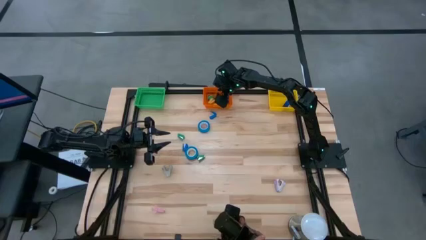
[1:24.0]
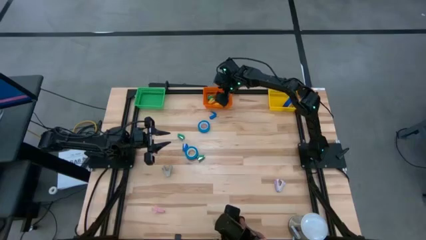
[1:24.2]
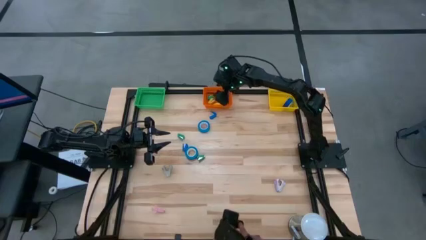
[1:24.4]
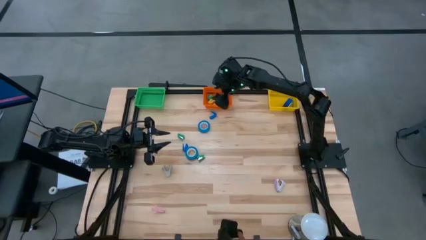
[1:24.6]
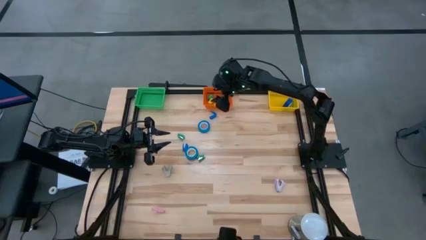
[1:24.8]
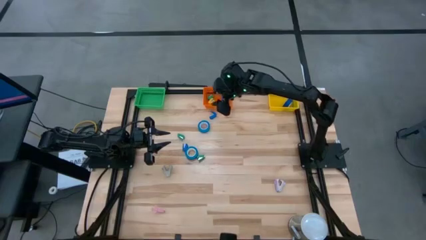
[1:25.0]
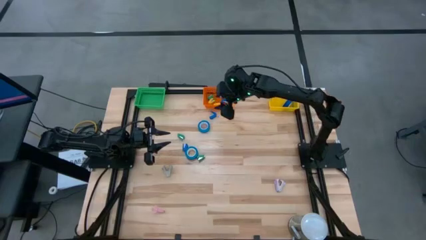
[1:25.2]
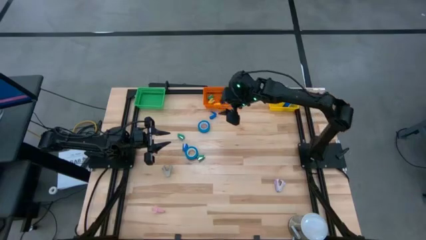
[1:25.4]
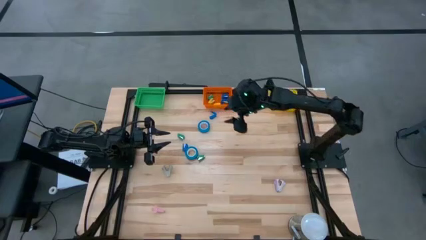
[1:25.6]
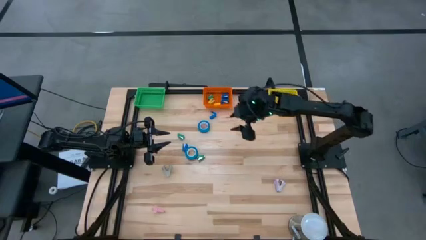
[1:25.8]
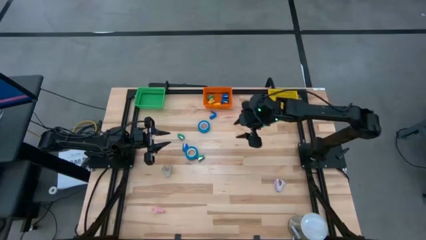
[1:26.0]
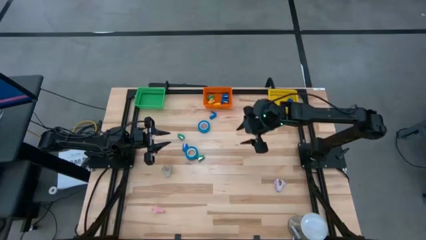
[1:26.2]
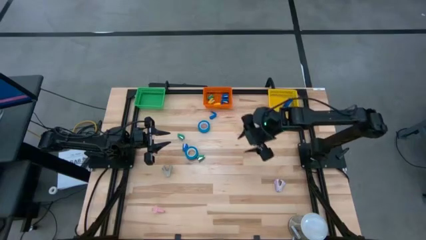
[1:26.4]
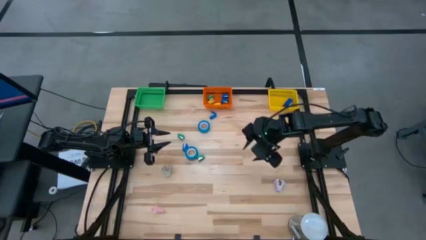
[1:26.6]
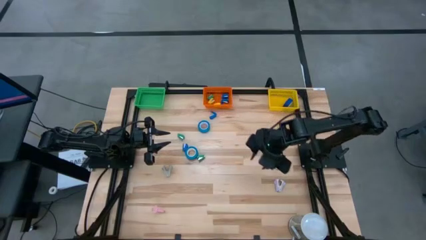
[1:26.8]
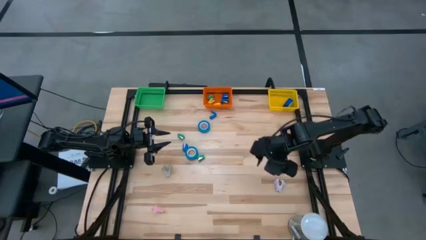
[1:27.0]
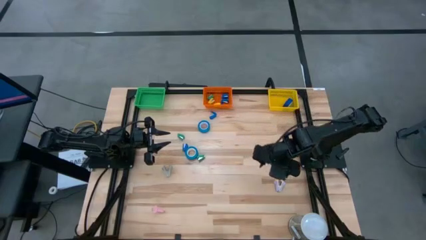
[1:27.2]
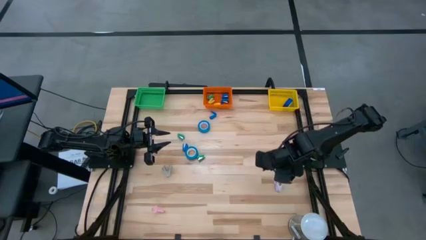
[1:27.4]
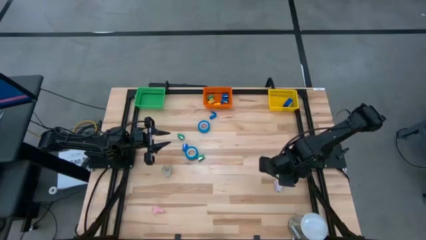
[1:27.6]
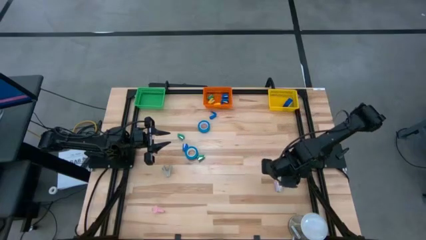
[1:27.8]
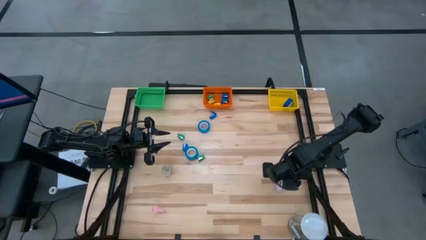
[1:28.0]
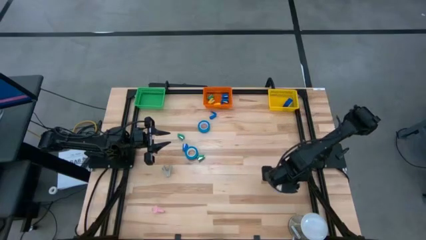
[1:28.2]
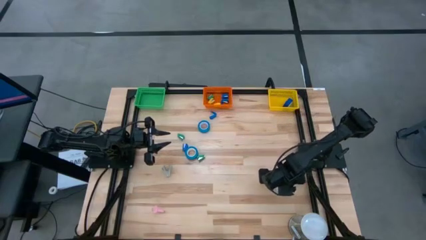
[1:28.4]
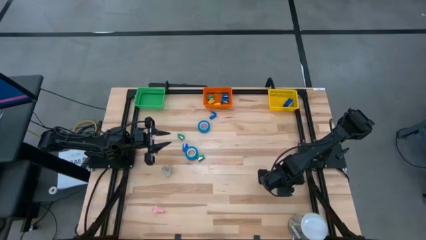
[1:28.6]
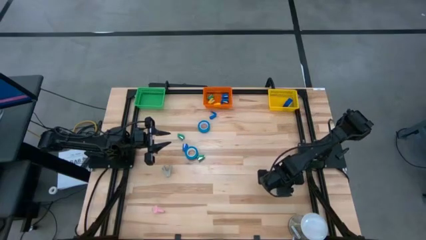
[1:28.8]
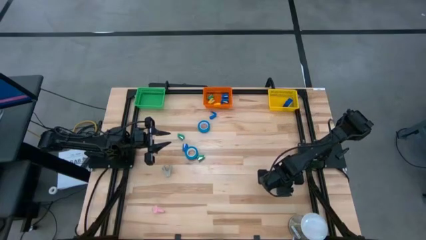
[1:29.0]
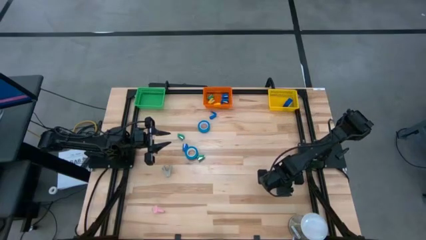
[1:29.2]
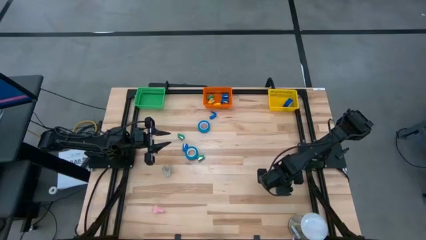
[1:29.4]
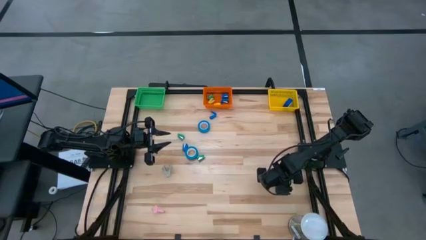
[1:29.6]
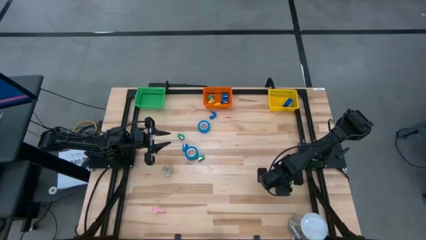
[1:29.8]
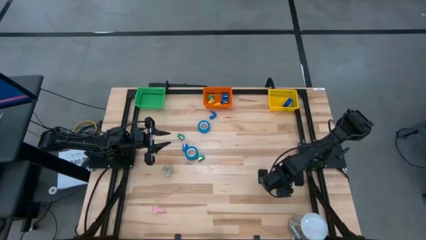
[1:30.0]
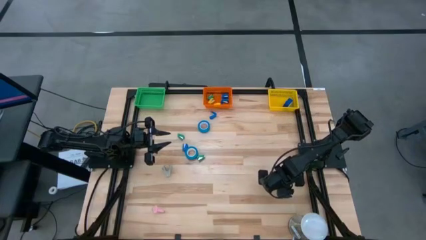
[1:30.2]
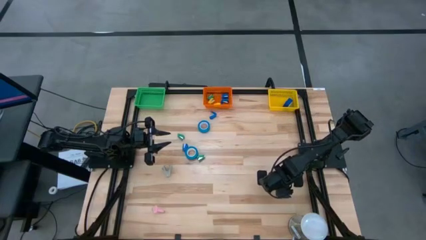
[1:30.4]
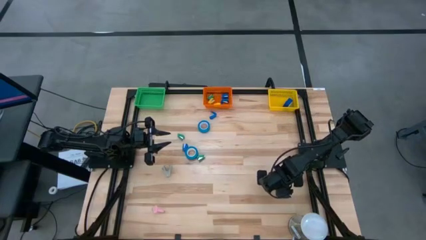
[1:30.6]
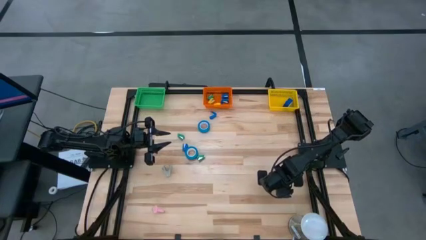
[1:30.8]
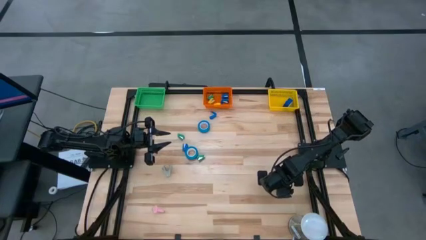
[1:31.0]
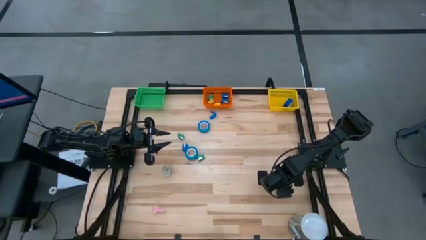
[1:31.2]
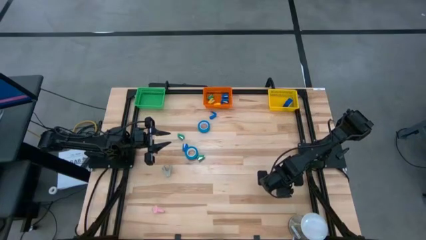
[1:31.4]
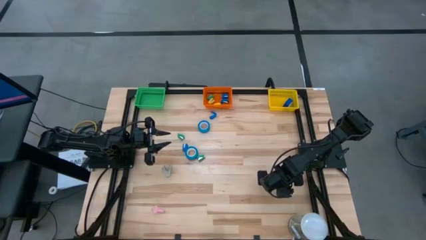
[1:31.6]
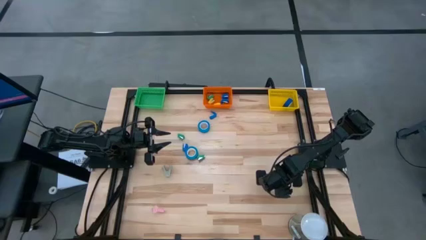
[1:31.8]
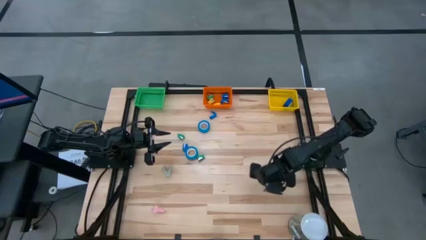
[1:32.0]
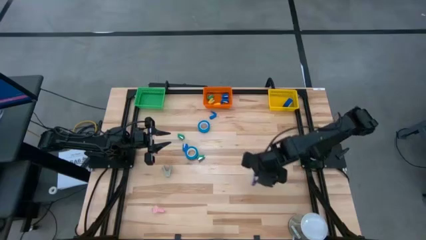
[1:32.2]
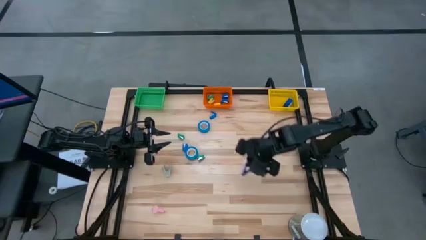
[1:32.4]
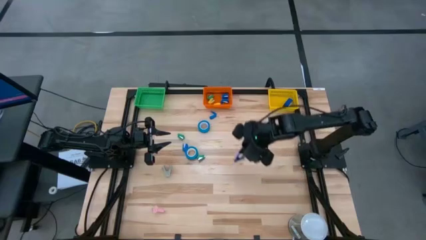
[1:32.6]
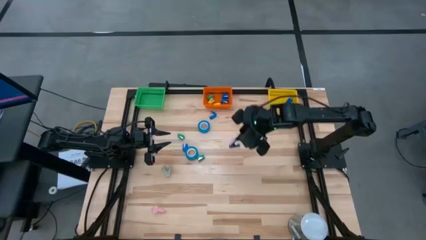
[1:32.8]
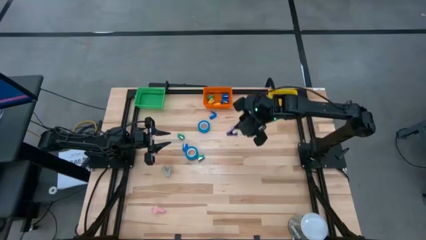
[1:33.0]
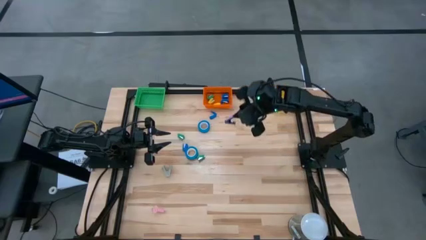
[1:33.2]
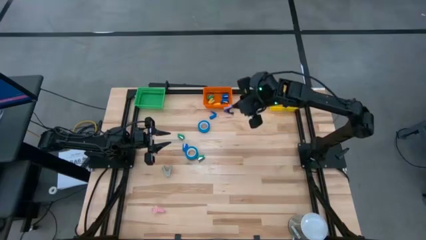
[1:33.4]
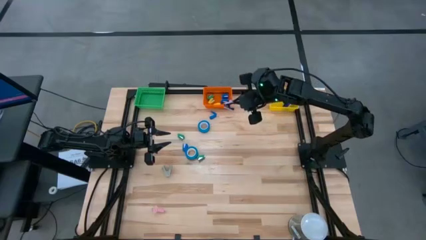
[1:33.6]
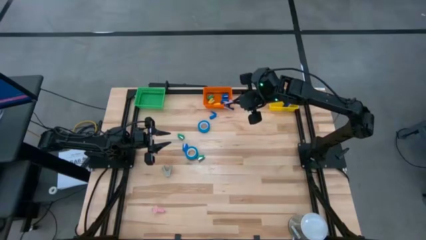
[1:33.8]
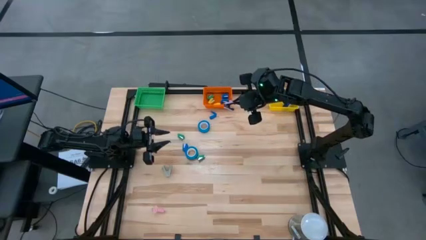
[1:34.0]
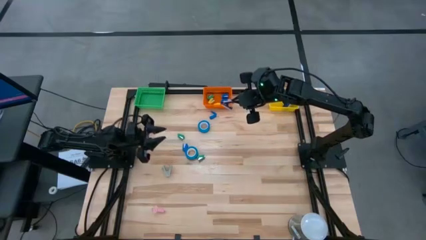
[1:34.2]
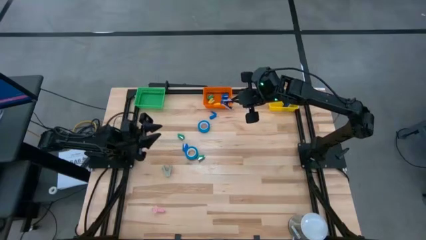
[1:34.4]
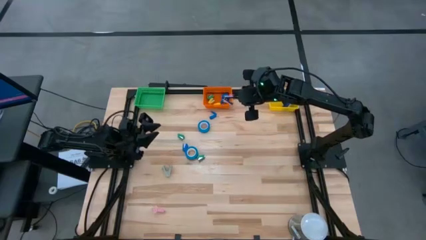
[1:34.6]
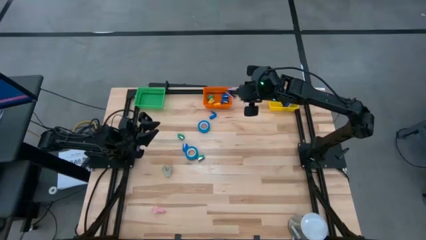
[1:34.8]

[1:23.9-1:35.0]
Task: Pick and place Stapler, Stapler remover, tape
Put the purple staple remover into the green bin

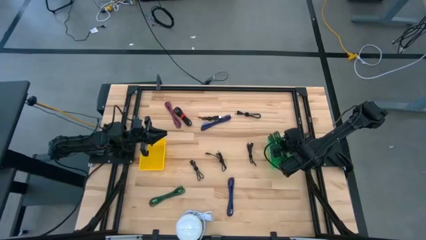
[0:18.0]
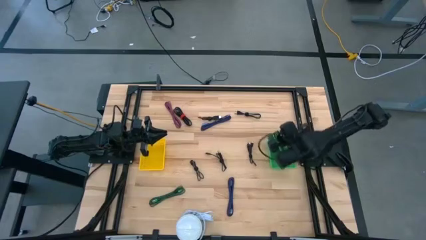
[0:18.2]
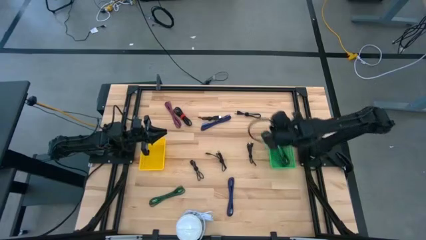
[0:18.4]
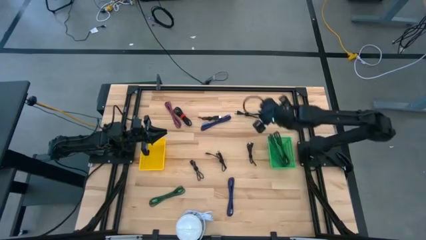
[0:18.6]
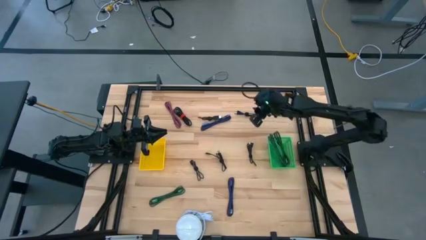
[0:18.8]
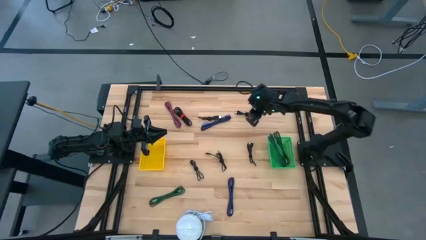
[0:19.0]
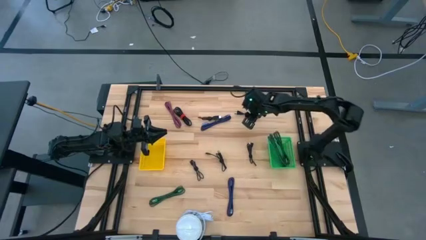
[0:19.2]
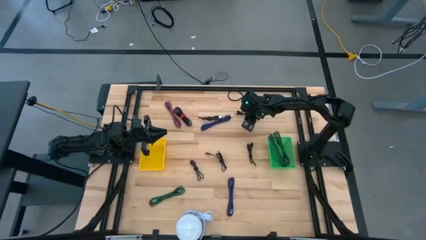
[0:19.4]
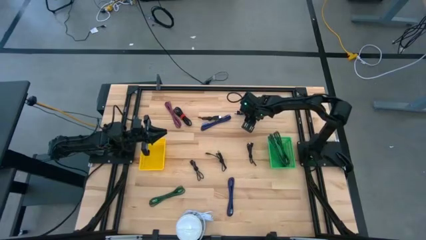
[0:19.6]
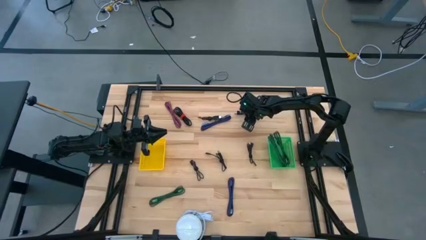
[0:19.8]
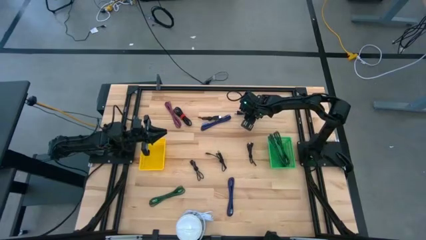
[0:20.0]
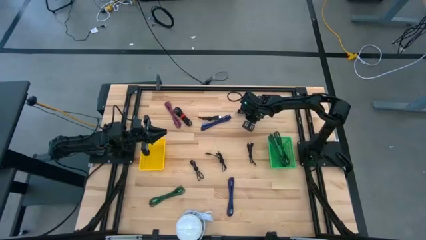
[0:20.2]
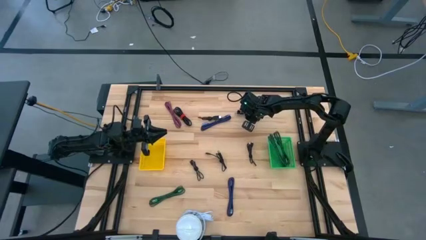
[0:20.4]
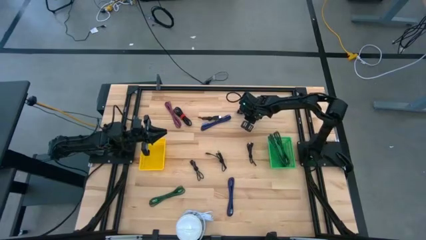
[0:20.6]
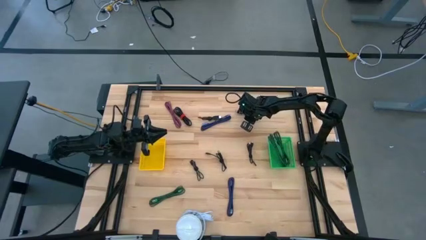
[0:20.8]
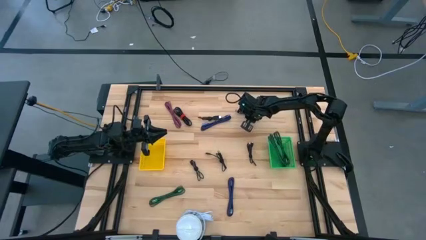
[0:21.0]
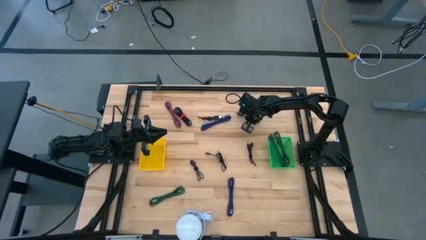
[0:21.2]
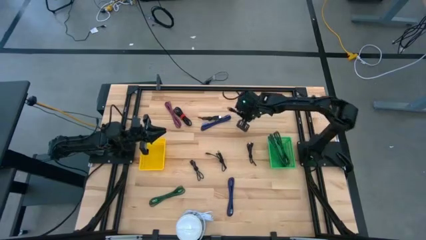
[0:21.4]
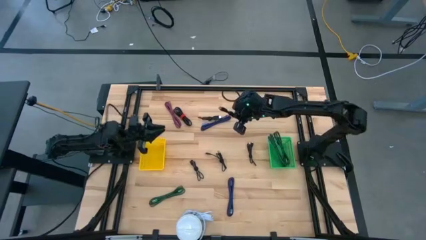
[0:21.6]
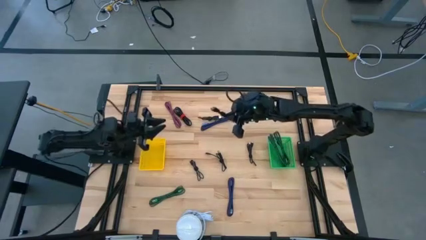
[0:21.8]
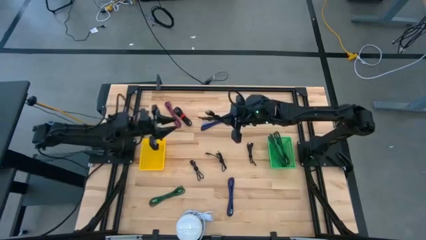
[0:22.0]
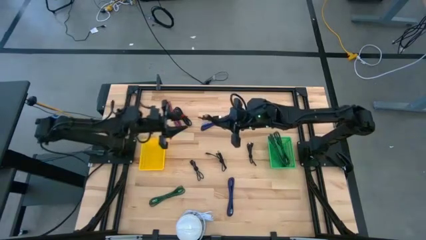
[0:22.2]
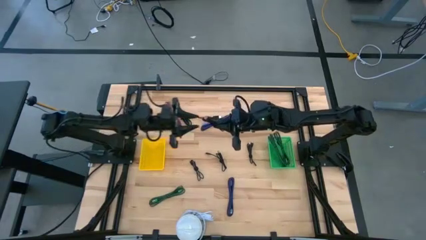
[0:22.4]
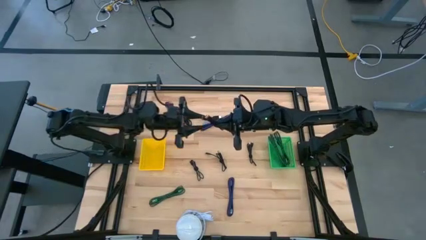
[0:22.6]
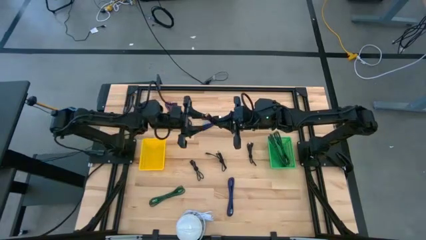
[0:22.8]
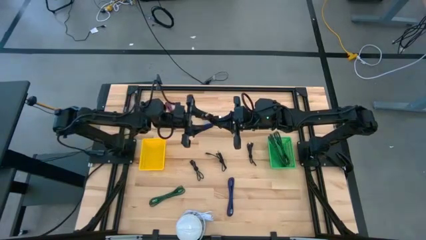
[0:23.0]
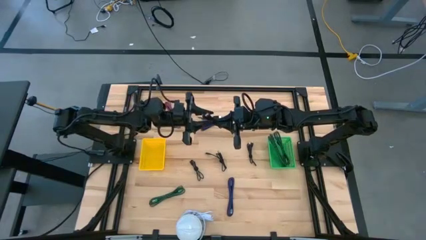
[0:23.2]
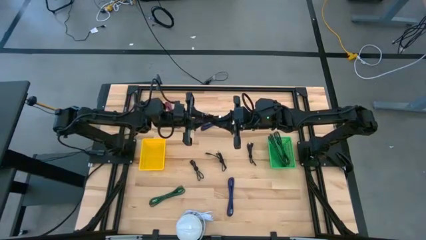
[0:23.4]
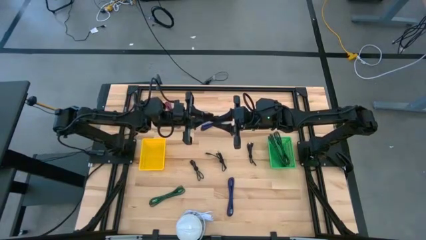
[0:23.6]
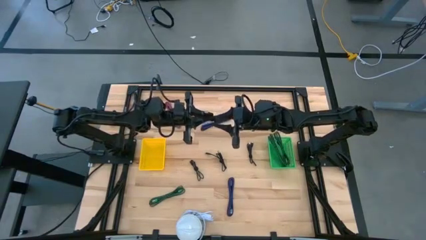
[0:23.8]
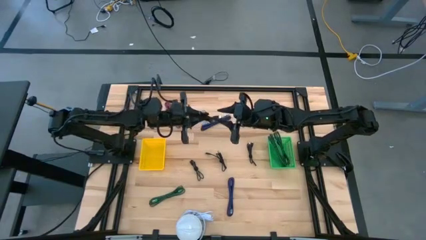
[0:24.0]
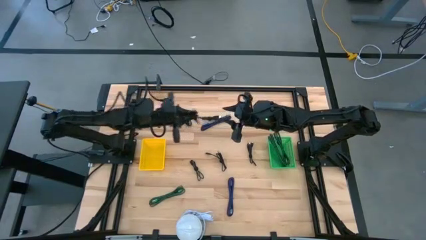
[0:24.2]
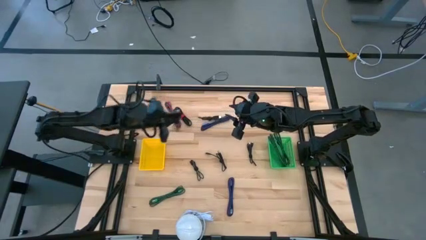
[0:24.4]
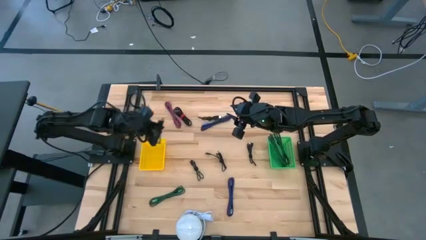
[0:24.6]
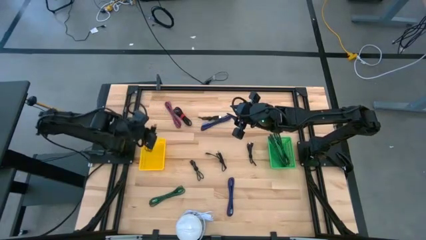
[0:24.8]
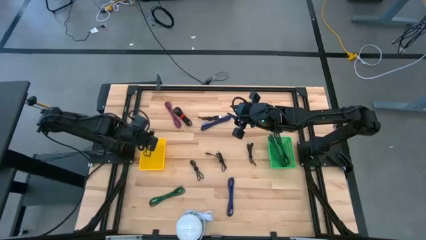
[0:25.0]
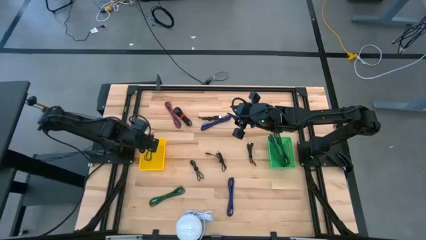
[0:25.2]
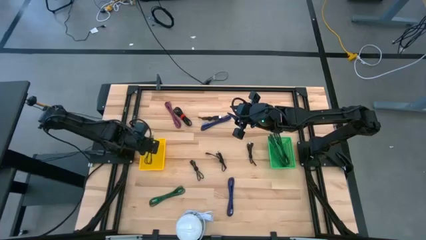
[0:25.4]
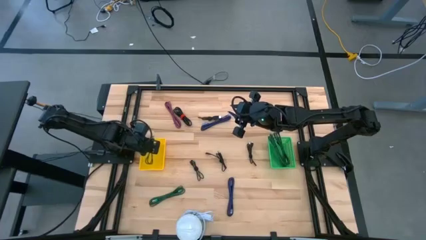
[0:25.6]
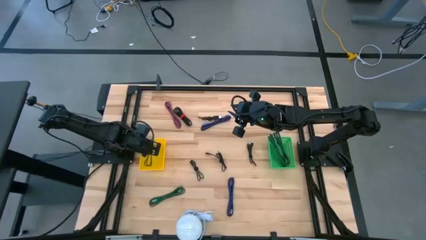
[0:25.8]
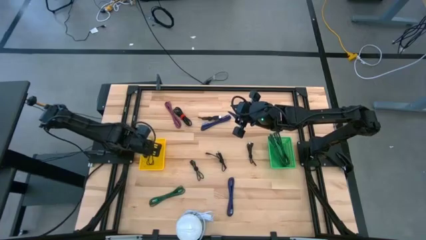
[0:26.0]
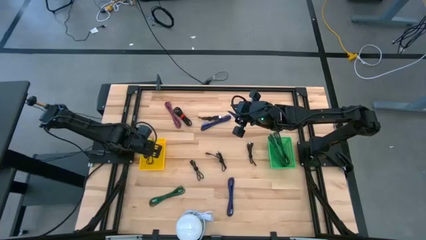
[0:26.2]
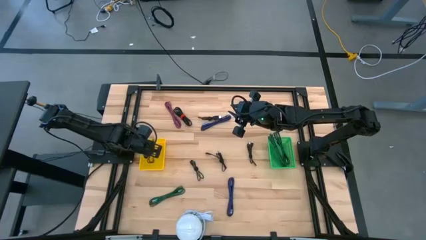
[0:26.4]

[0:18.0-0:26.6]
Task: Pick & Place USB Port
Put the black charger cable into the yellow basket
